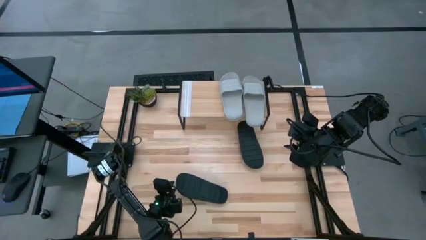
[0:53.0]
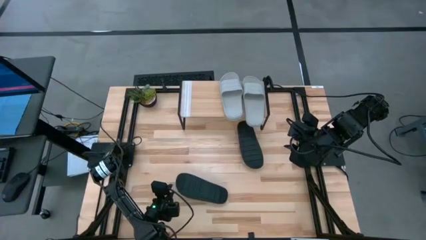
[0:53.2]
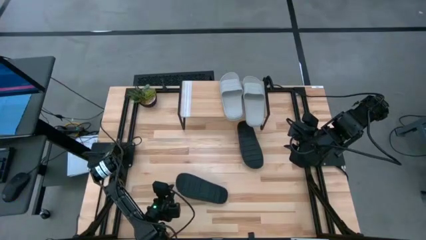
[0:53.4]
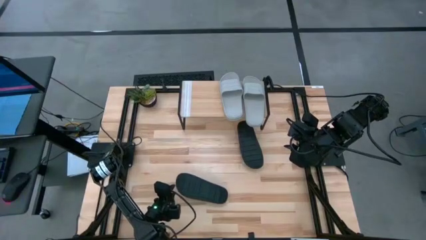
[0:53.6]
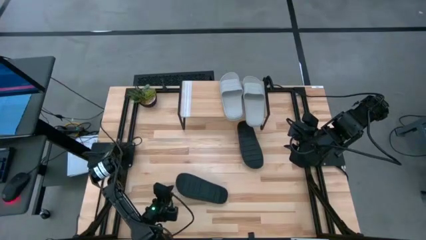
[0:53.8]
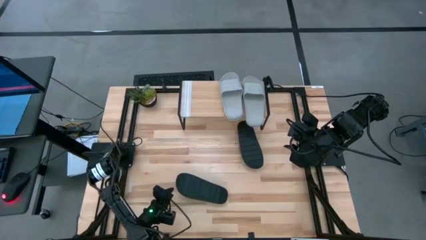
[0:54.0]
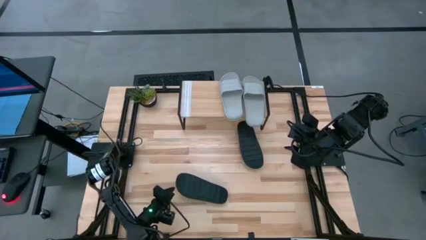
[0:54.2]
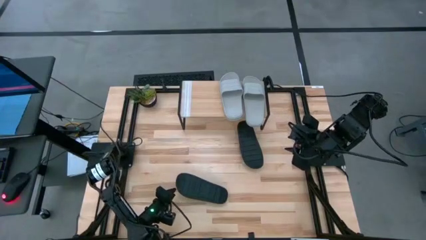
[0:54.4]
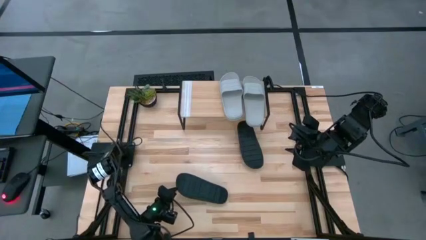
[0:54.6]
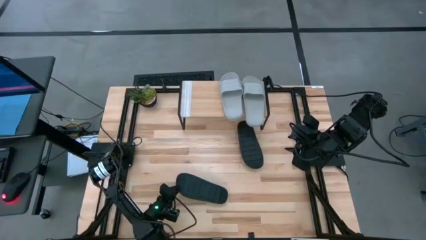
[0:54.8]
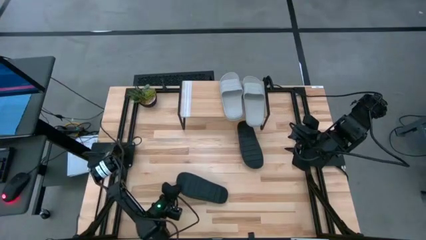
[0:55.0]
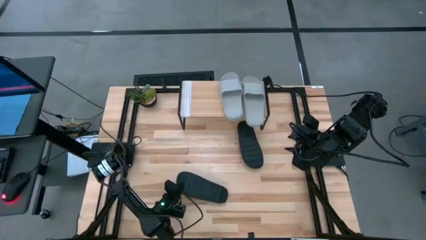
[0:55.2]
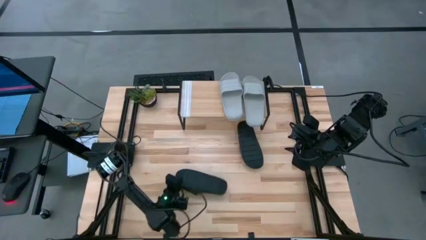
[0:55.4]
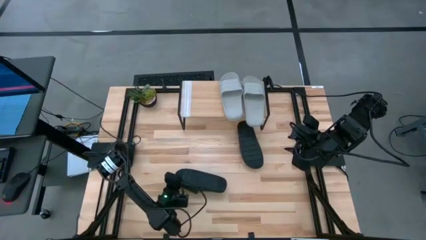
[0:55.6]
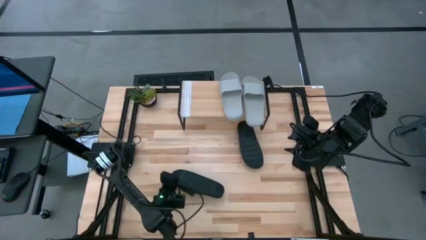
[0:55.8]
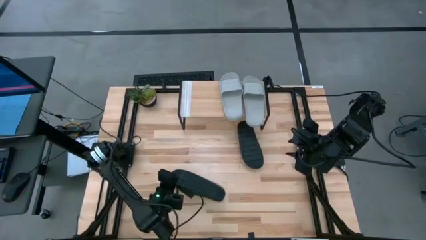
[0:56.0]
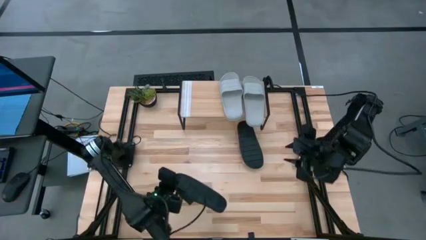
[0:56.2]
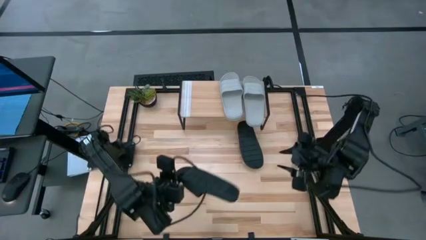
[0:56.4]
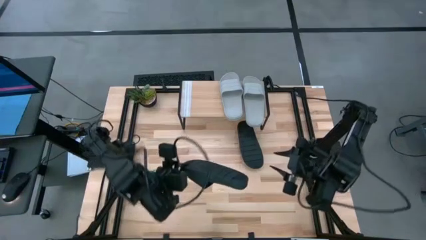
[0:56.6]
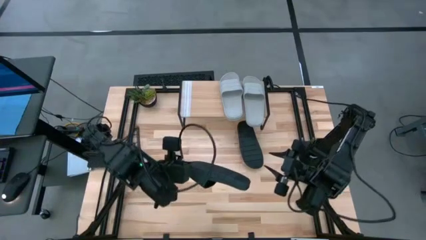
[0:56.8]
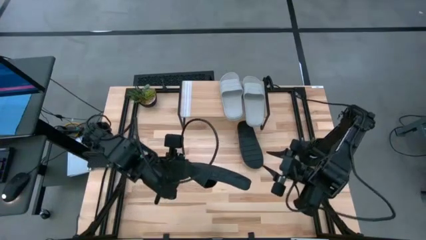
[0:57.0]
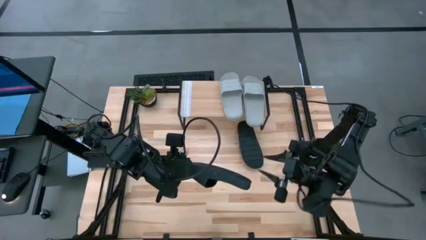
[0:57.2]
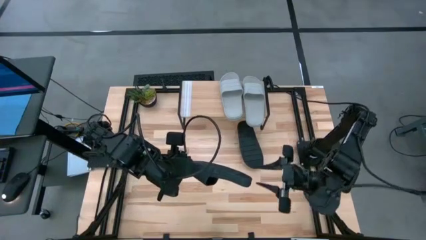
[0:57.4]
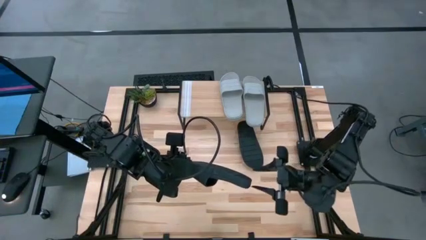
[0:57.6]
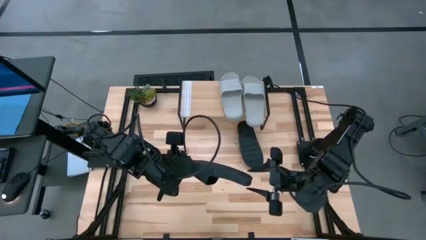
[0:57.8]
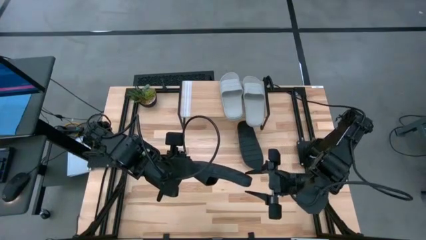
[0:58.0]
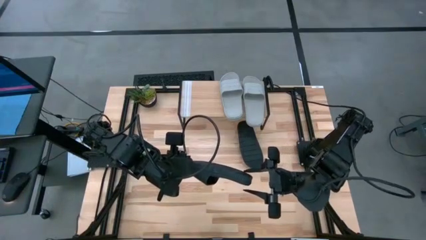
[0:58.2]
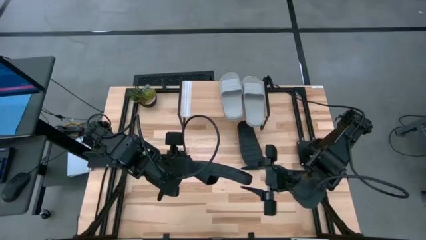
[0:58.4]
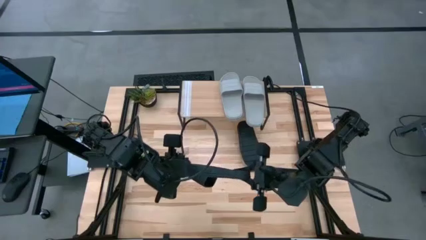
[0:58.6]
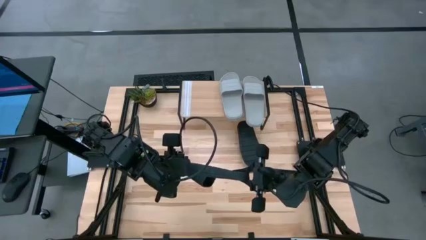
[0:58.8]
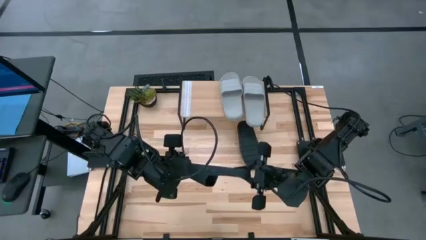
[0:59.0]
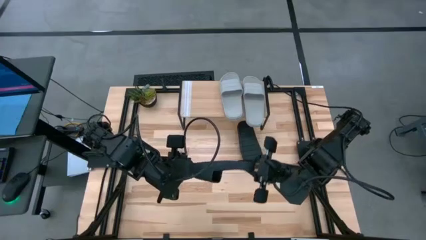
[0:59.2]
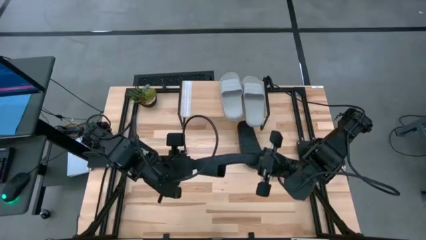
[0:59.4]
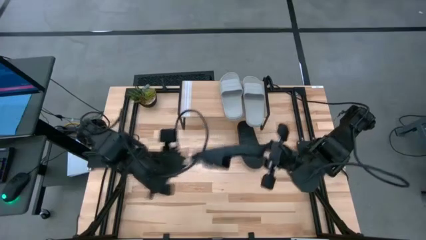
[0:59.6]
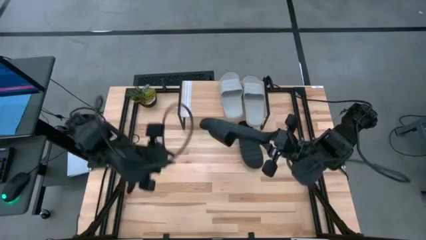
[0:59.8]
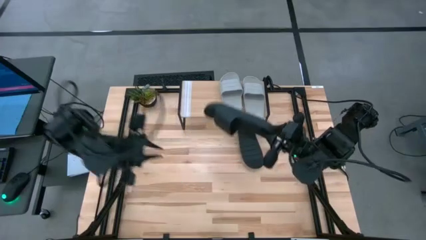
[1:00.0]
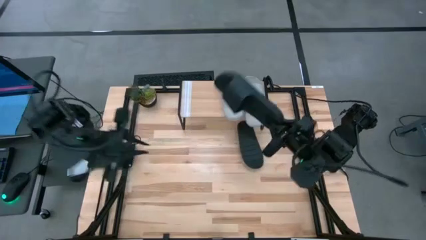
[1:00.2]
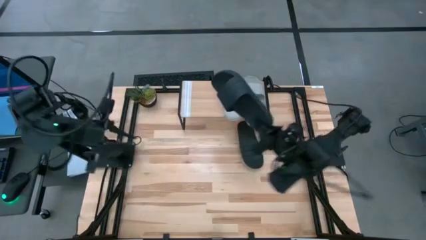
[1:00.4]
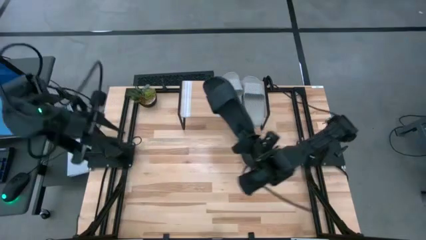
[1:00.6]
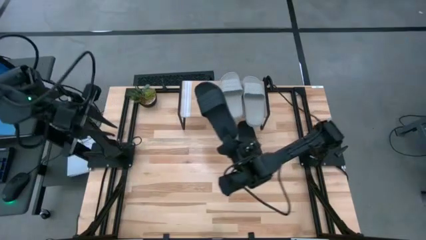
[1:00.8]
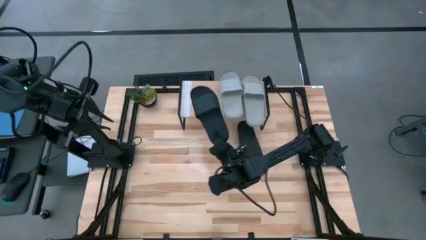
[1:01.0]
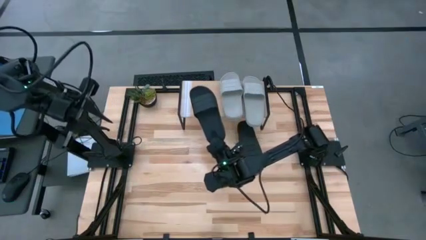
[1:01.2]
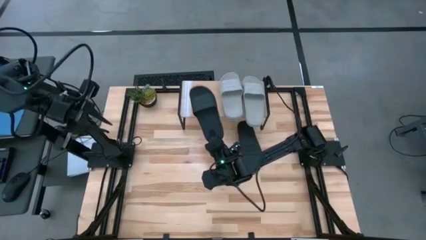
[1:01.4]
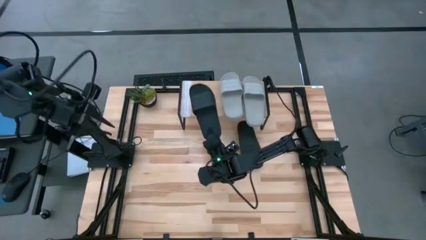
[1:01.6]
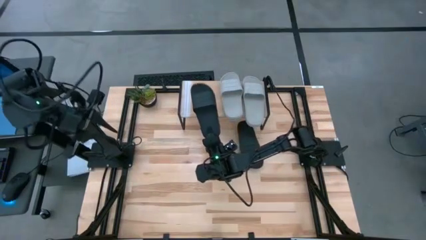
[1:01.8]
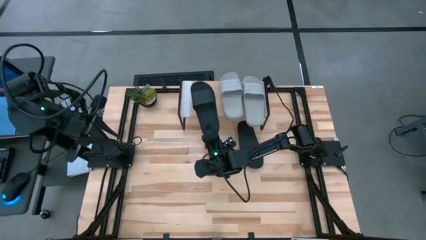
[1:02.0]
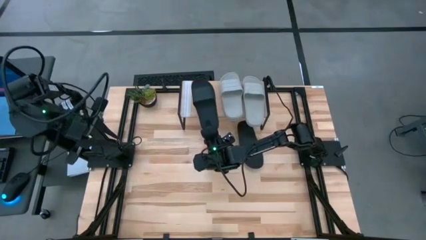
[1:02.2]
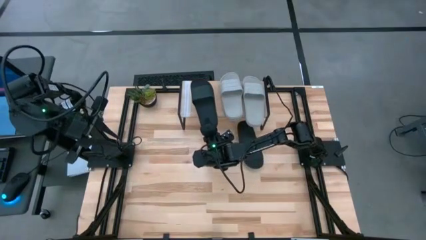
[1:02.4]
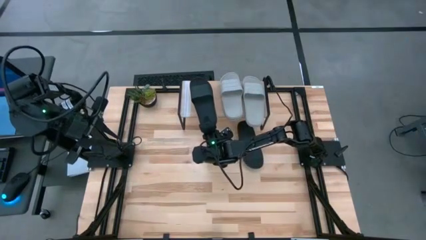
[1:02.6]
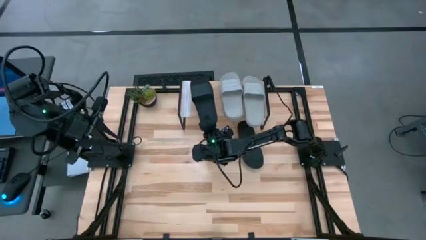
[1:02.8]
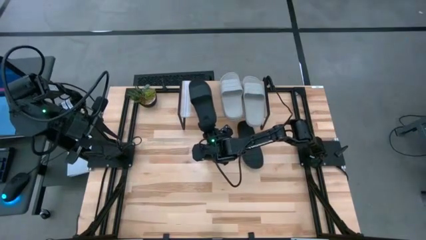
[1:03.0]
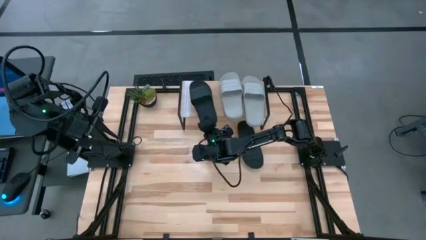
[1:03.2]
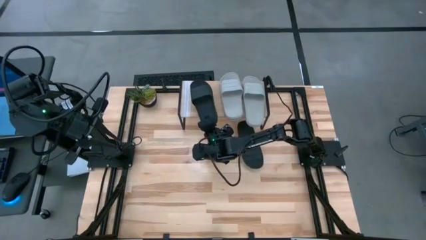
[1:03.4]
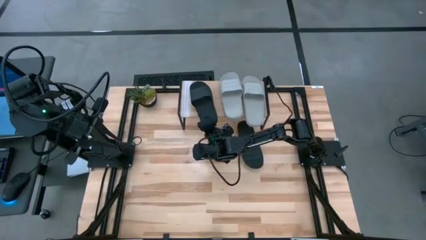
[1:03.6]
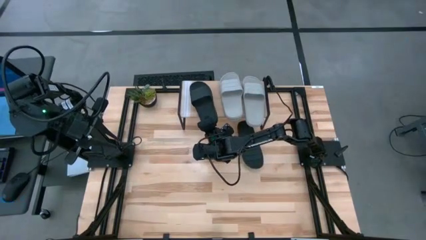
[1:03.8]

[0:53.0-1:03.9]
Task: Pick and place slides into the shelf
Put the left black slide on the shelf

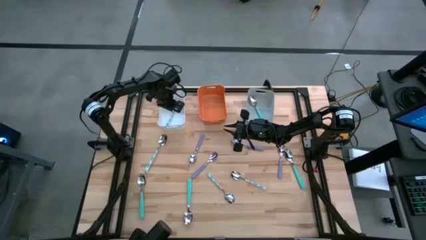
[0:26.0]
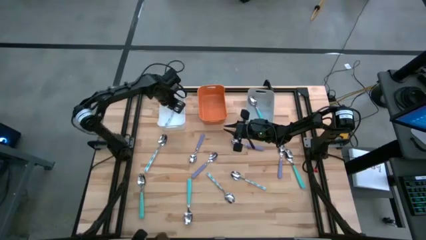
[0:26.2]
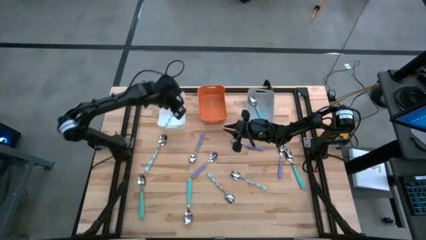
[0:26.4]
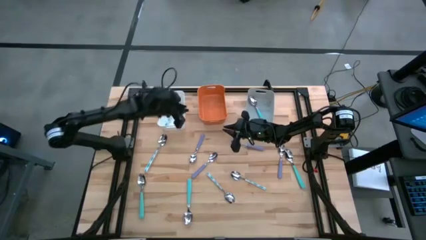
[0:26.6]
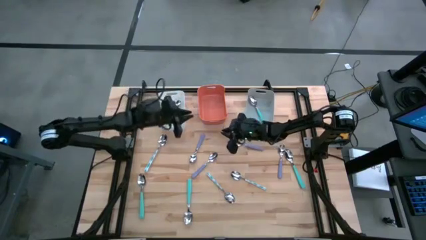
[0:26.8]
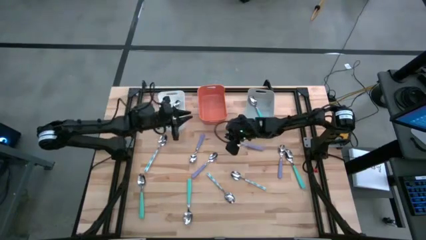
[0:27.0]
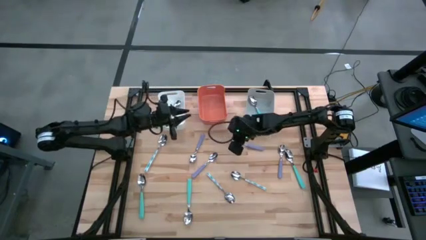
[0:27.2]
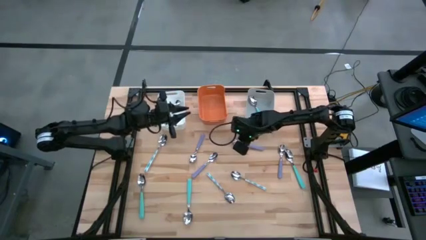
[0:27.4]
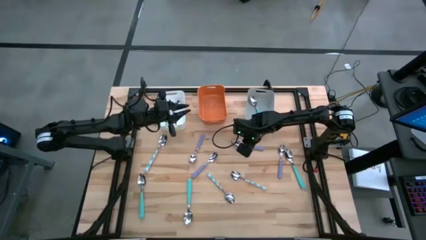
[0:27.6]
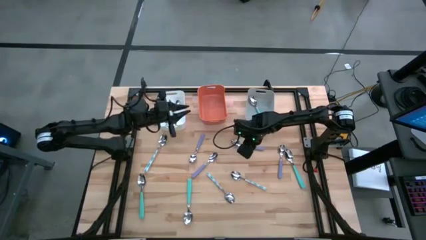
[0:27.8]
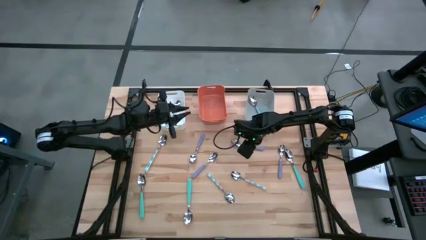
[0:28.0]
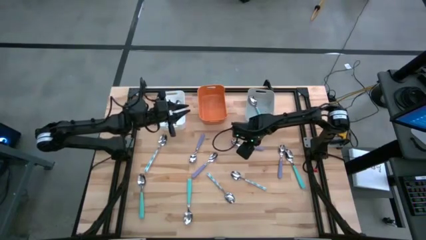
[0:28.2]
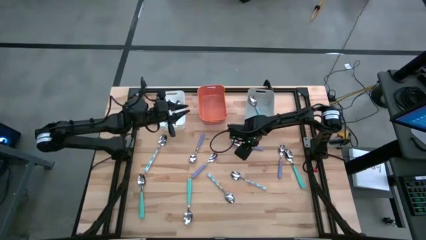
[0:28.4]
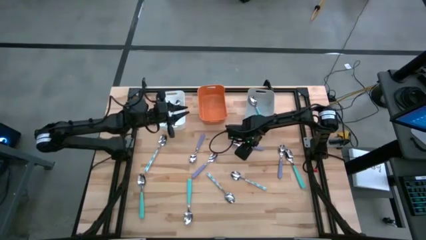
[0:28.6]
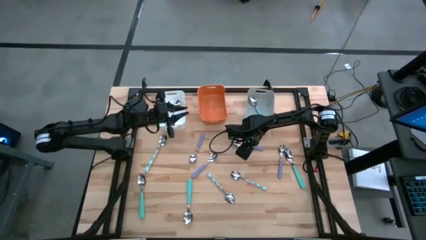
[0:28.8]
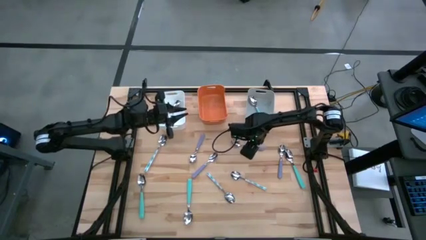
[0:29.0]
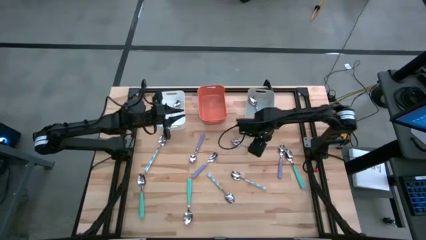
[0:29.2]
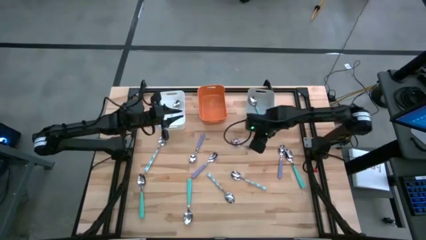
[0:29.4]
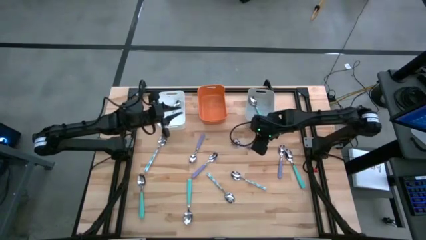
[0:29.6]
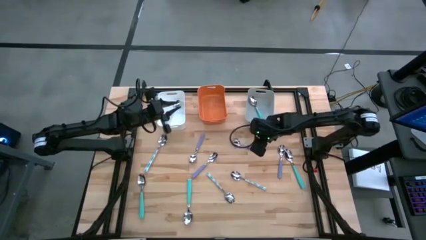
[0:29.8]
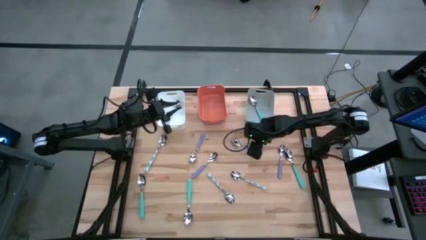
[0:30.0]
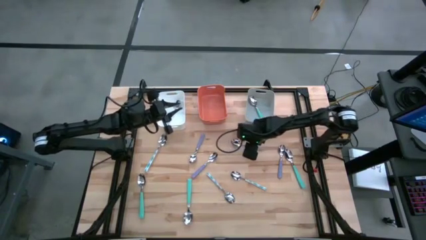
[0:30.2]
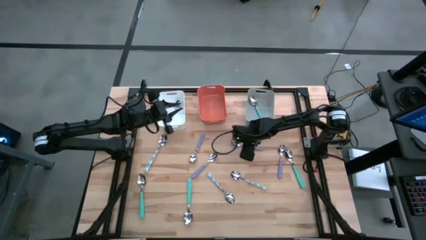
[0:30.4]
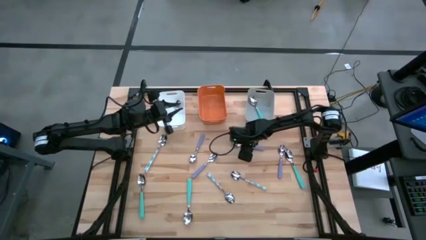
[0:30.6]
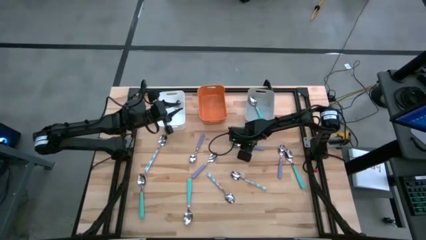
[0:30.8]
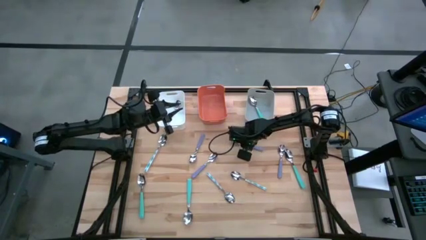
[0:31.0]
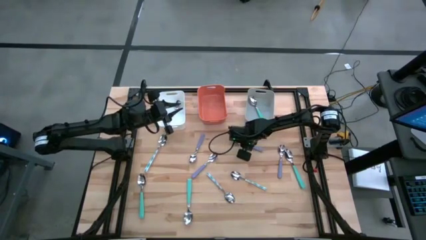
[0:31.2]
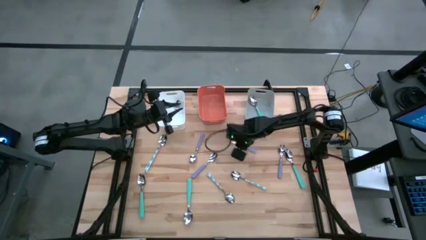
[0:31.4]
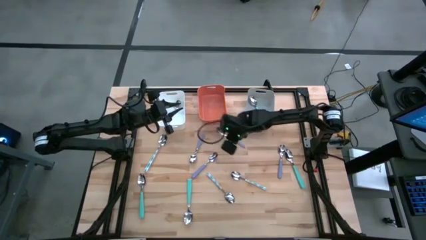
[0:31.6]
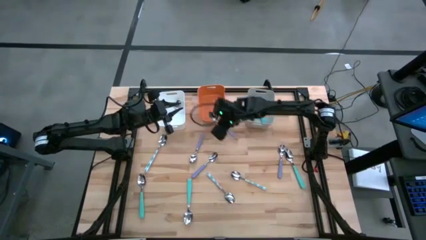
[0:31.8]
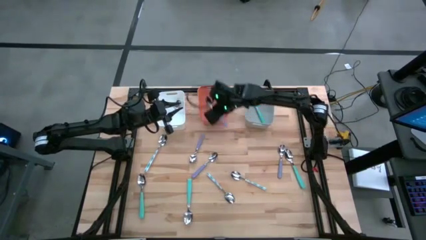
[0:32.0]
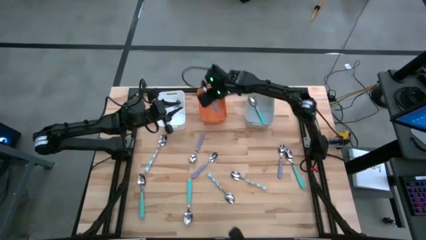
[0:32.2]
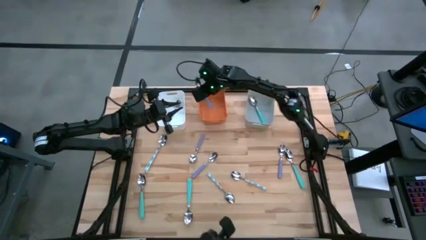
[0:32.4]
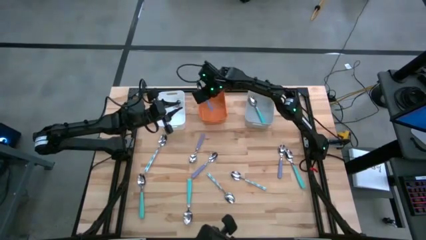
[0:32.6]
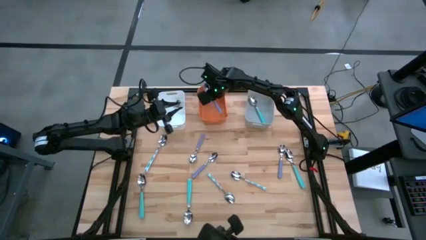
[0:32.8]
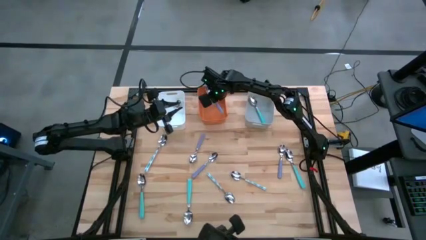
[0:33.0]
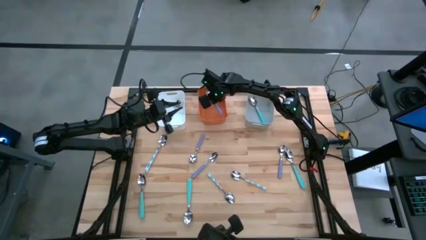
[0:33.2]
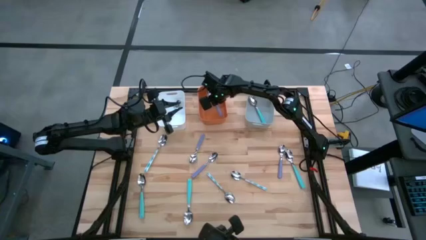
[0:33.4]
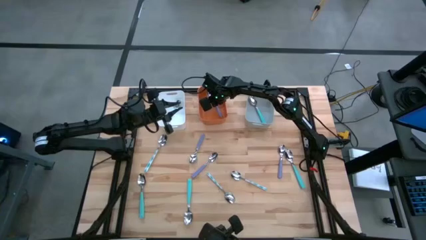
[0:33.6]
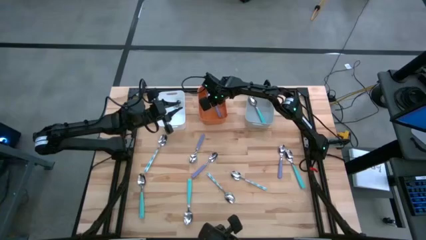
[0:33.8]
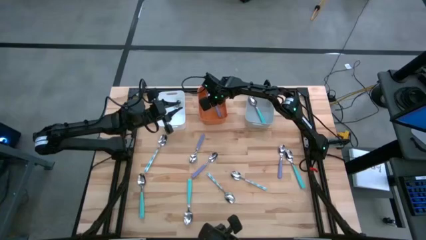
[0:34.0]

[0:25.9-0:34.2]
Task: Sort silverware by color (type)
Put the purple spoon into the orange bin
